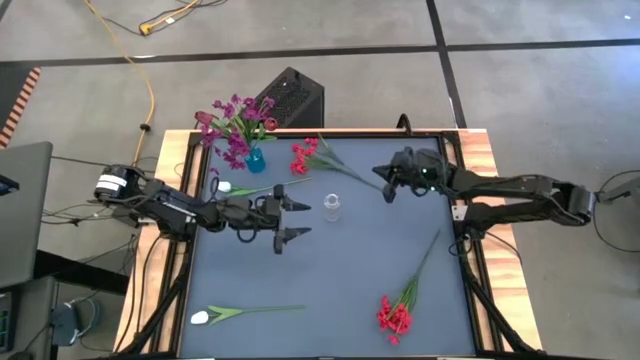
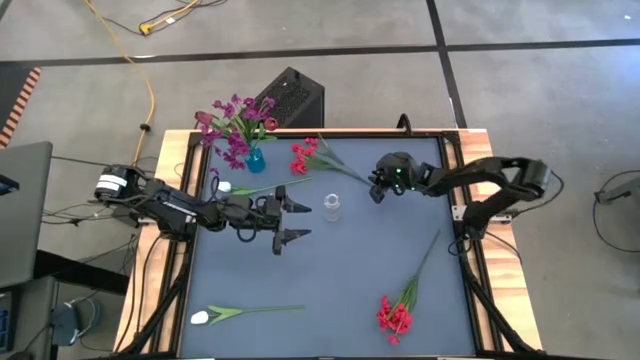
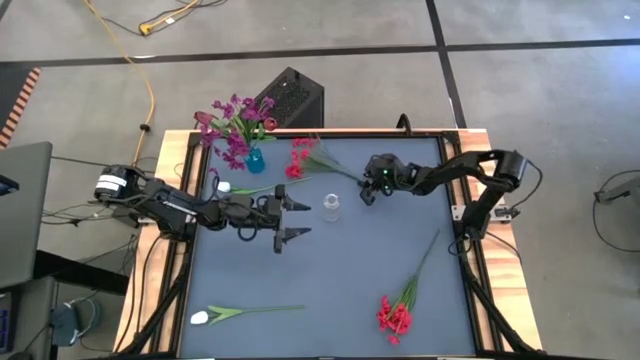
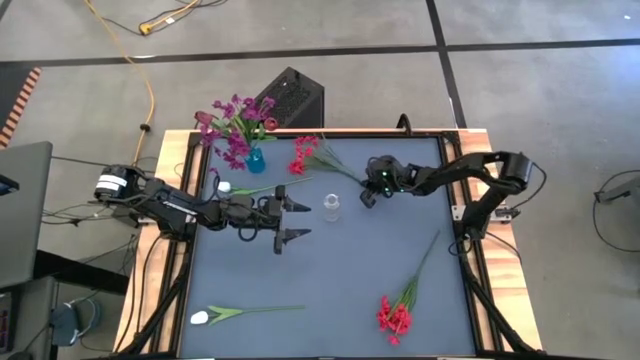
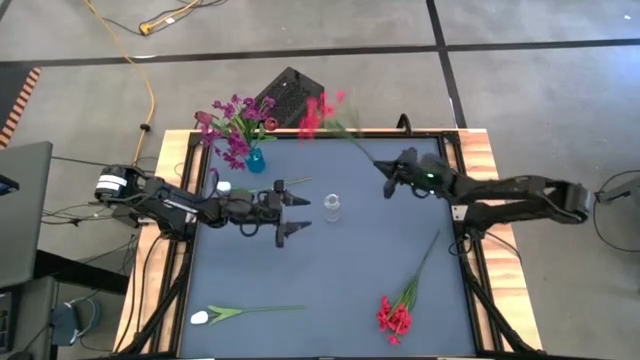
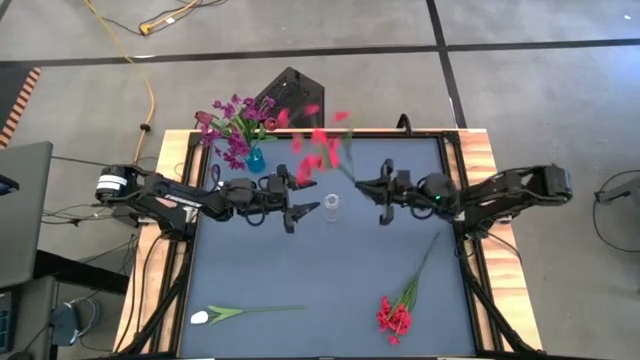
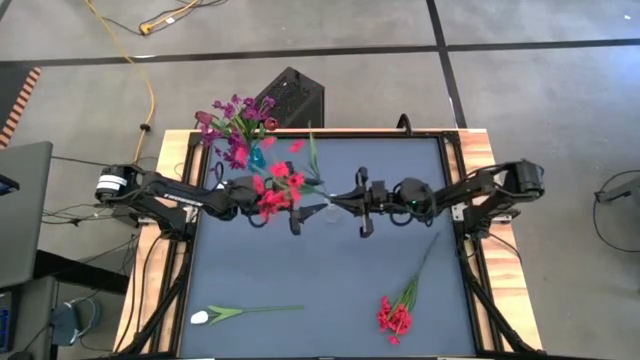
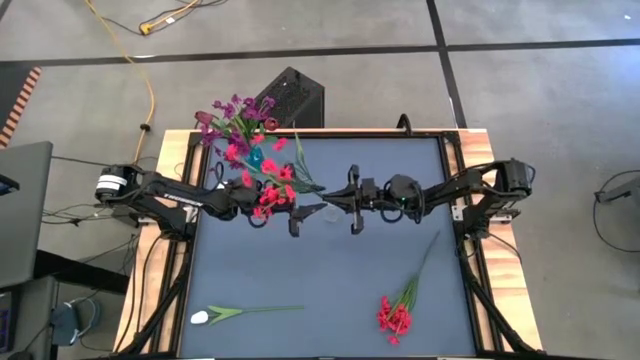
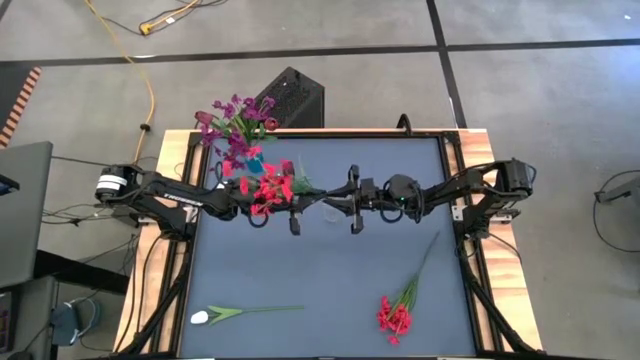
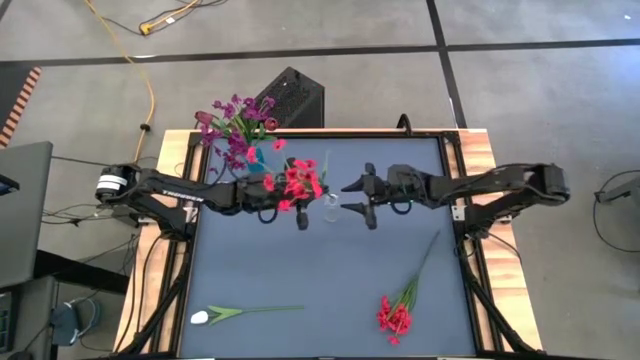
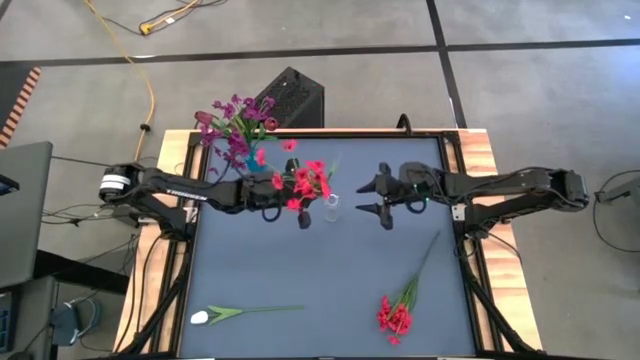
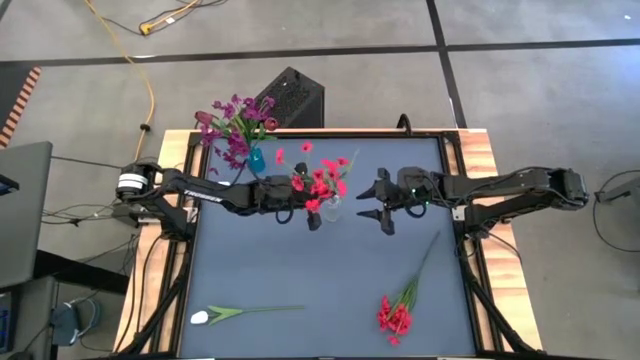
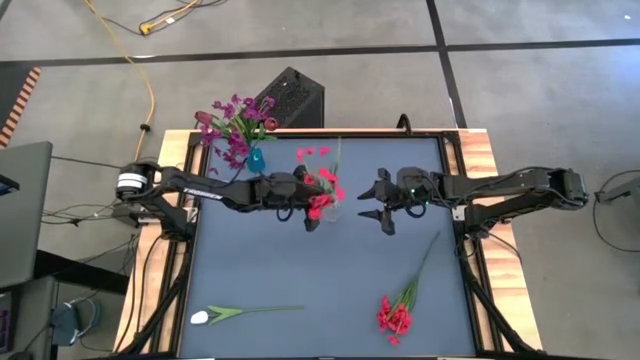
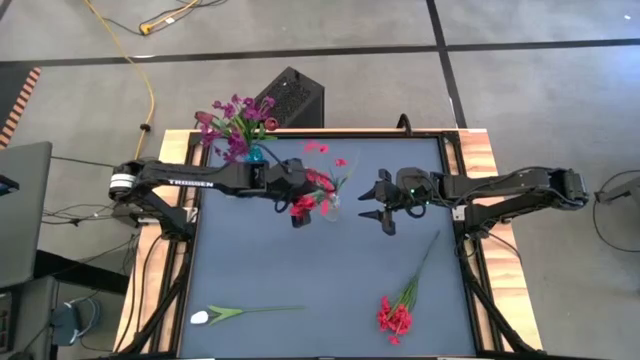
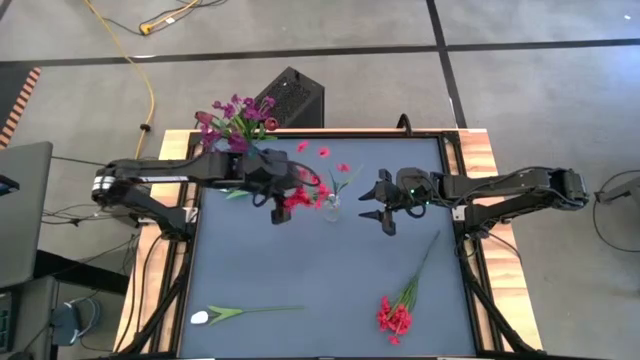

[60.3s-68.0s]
Task: Sort flowers into vase by color
Put the top red flowers into the transparent vase

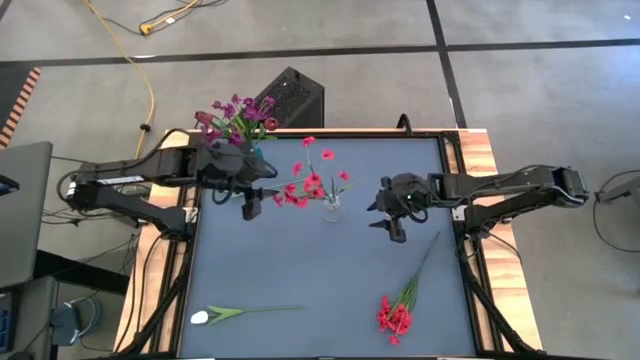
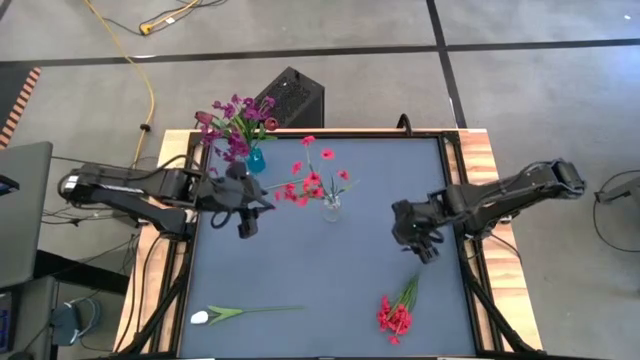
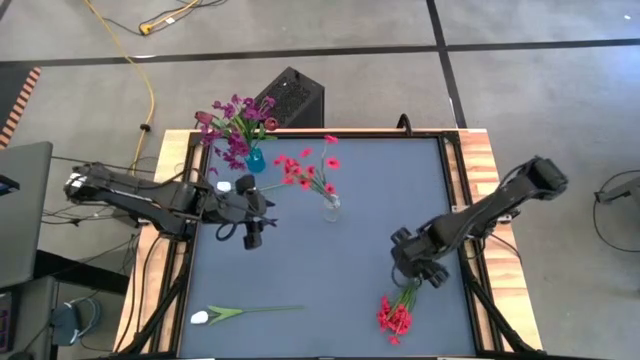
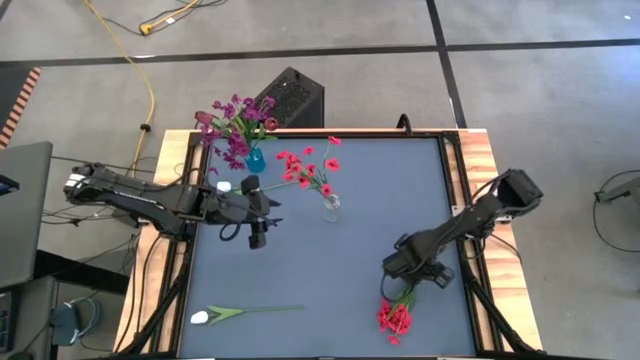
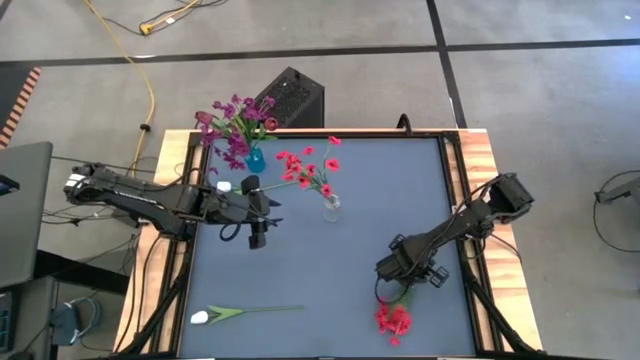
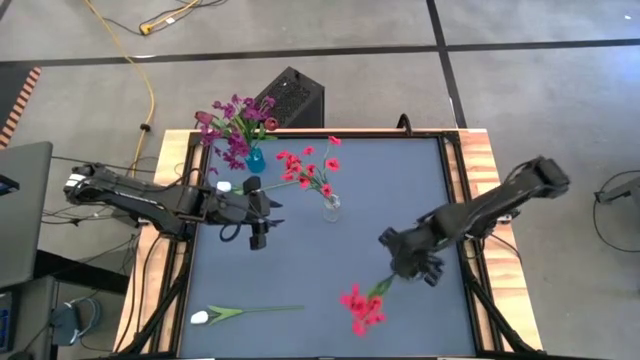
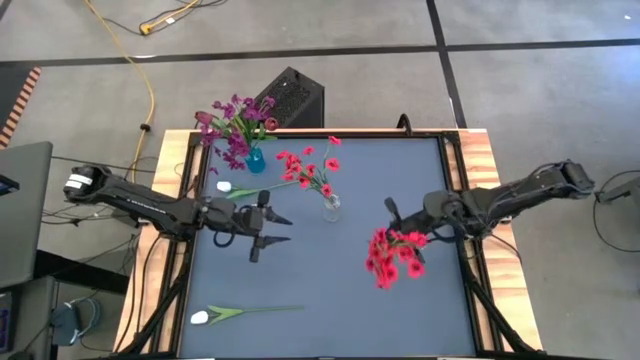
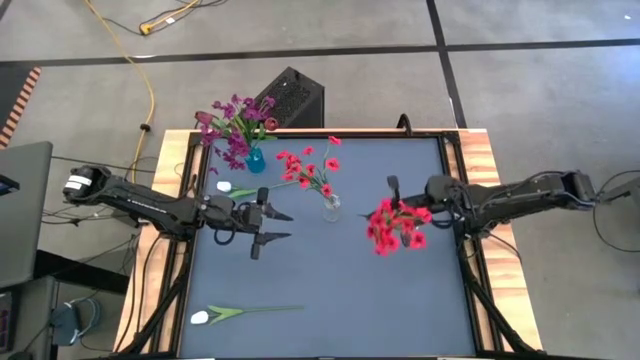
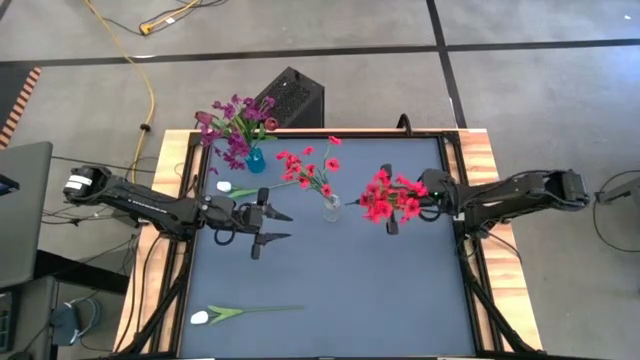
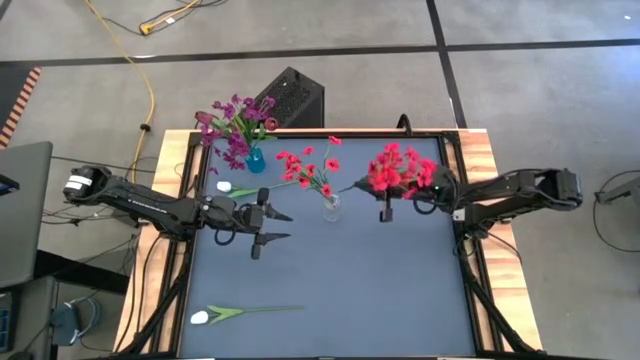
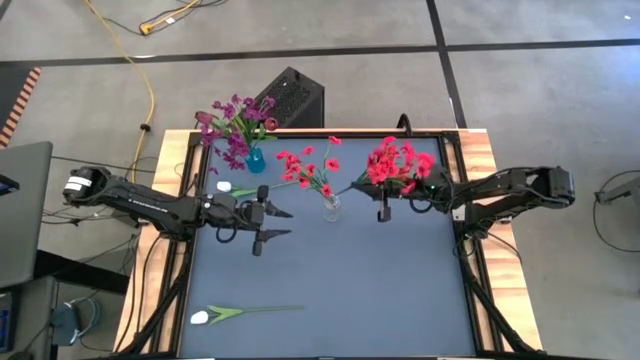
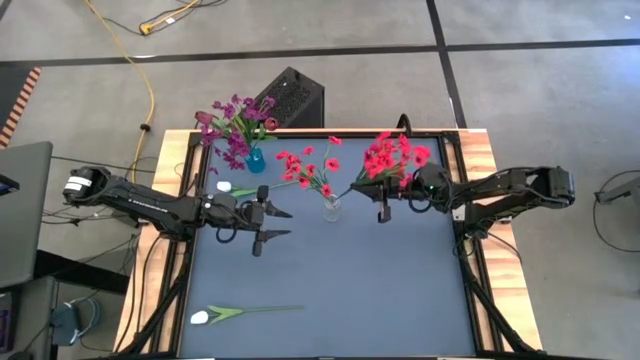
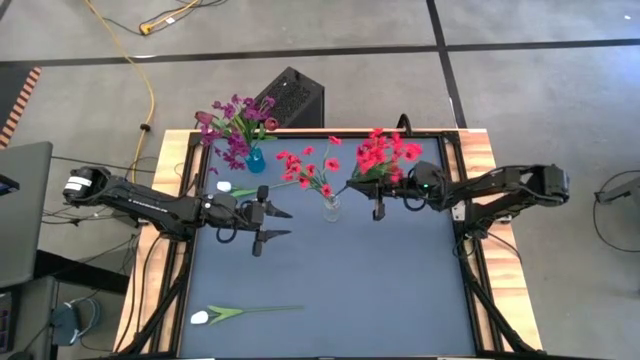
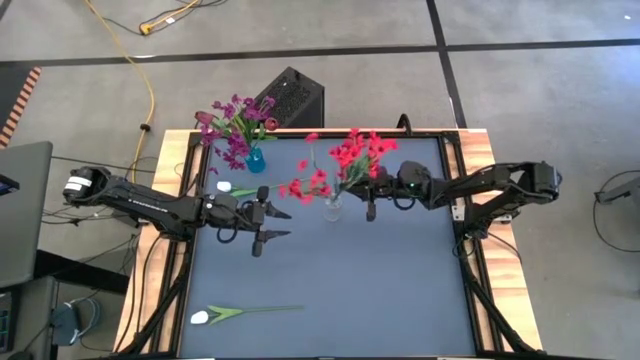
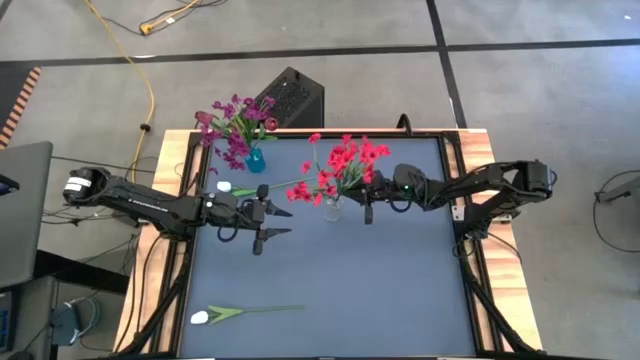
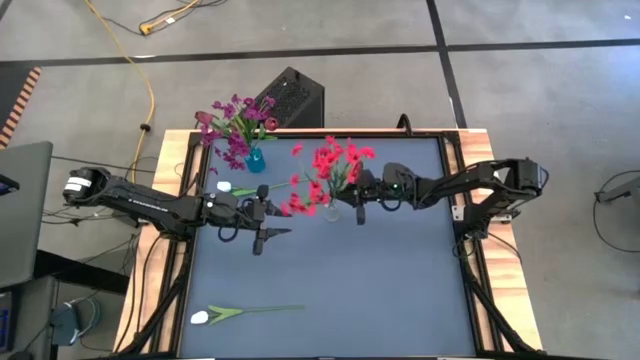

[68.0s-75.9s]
Put the red flowers into the transparent vase

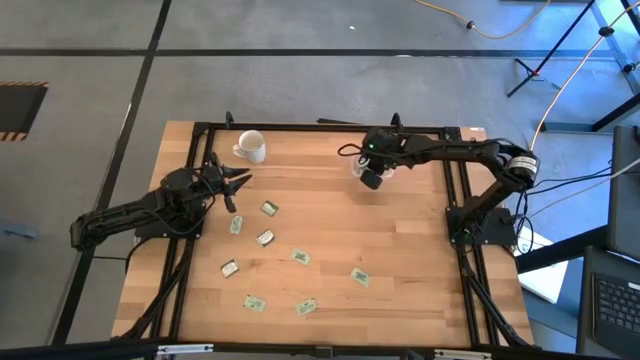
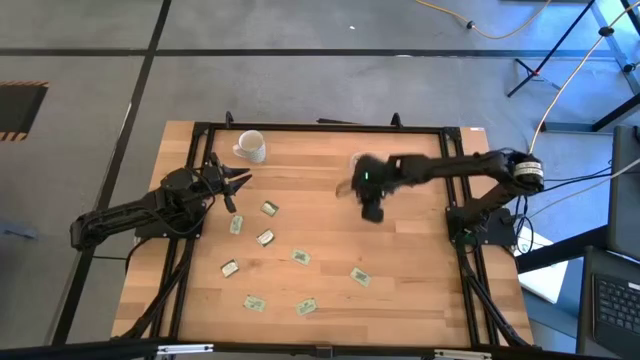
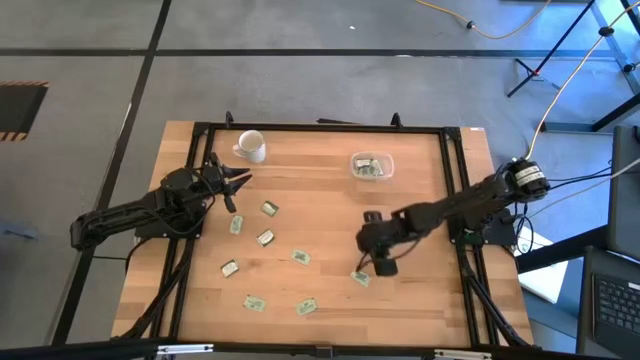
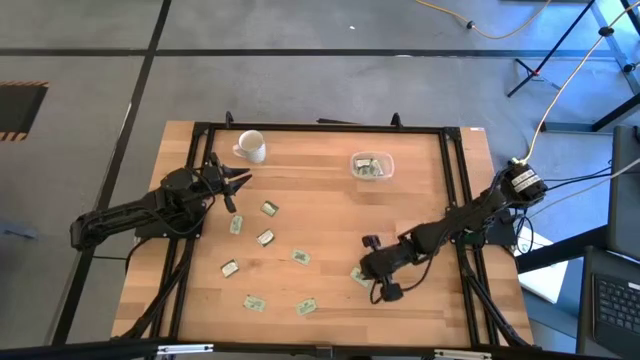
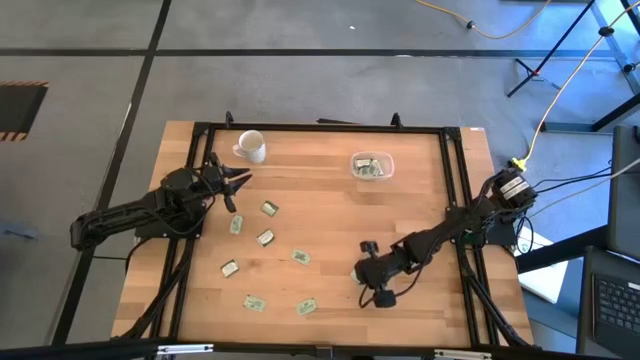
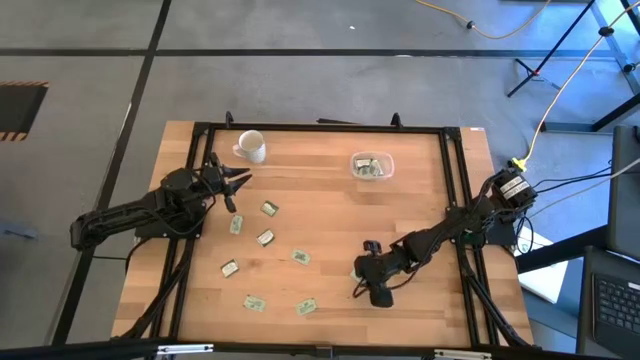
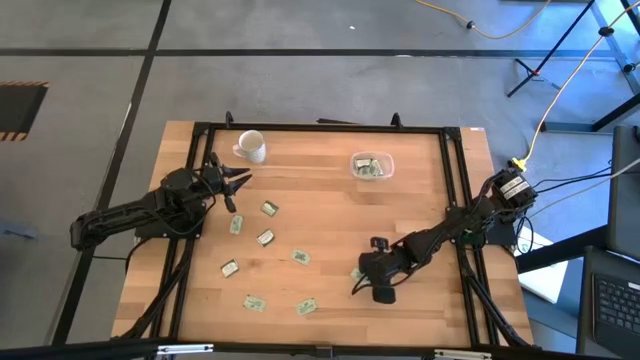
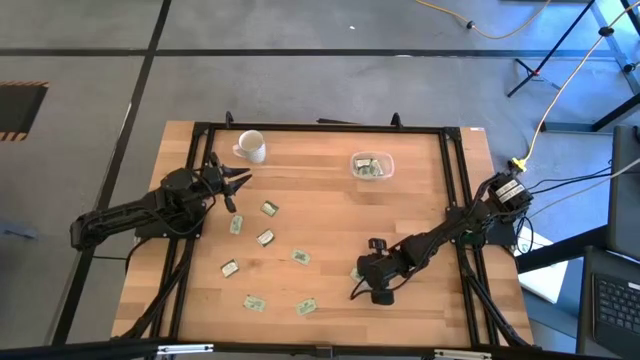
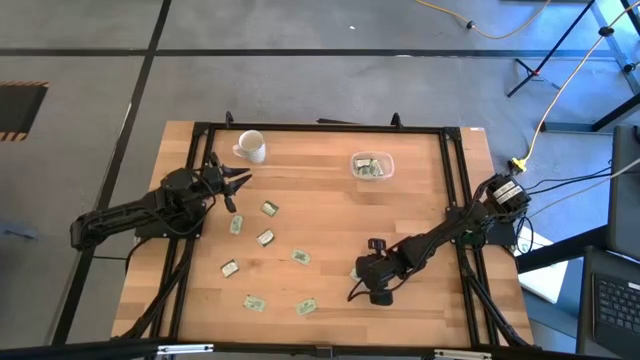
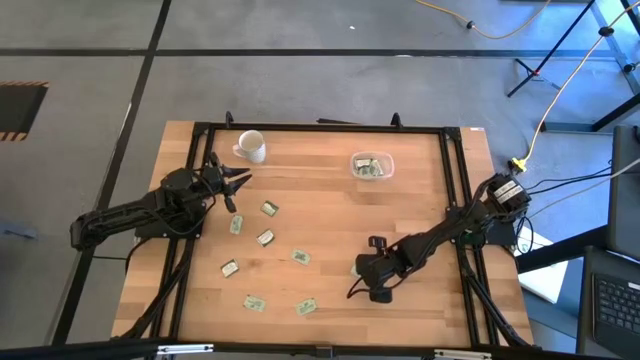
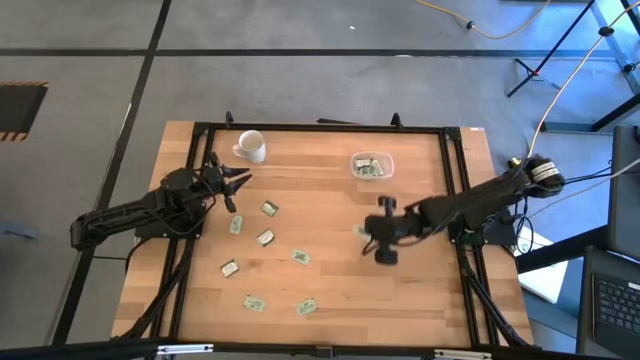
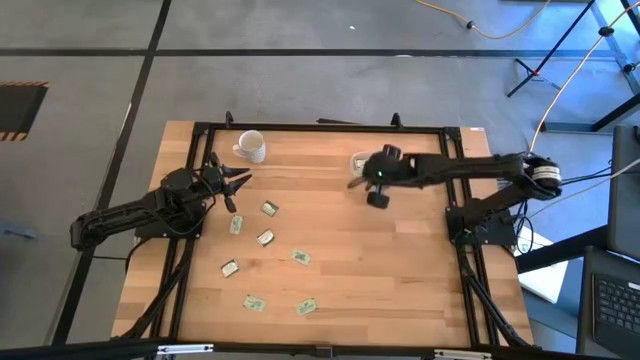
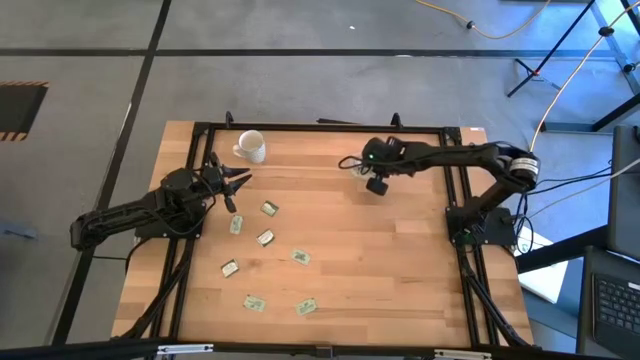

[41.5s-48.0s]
Task: Pick and place items into bin
Put the stevia packet into the transparent bin
